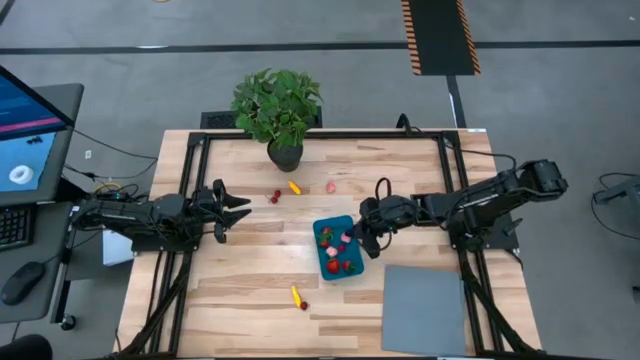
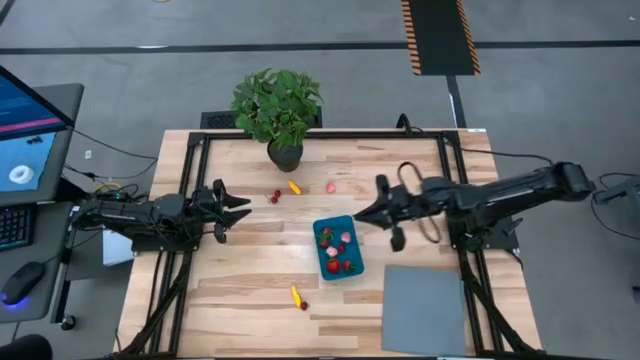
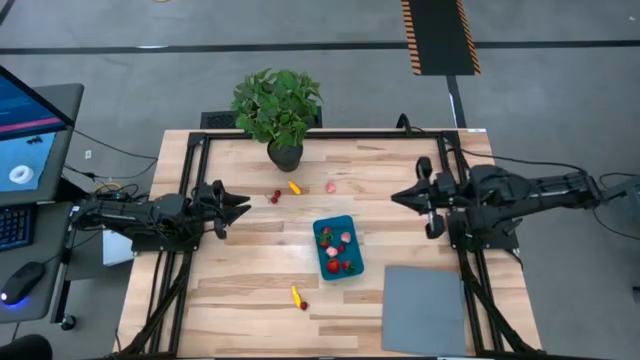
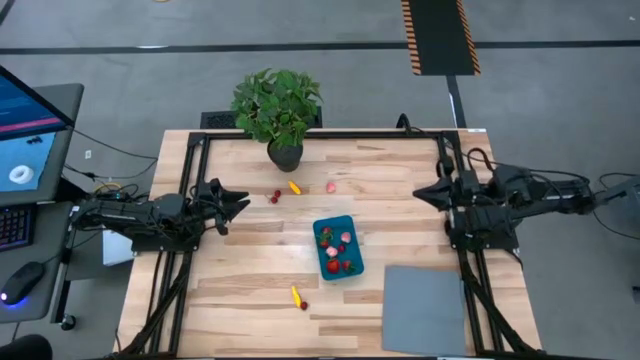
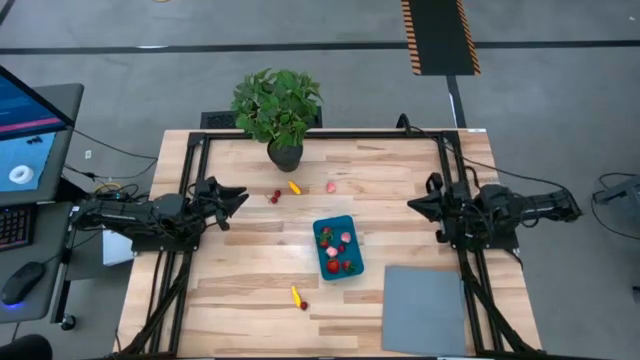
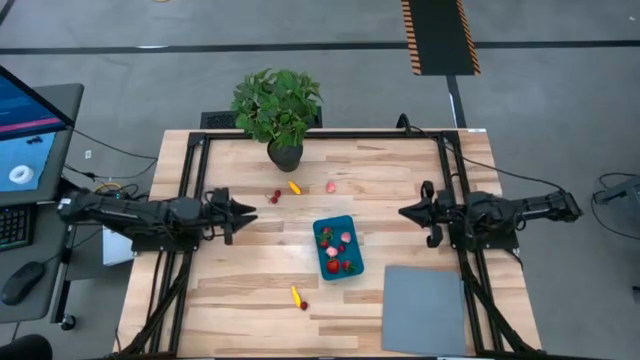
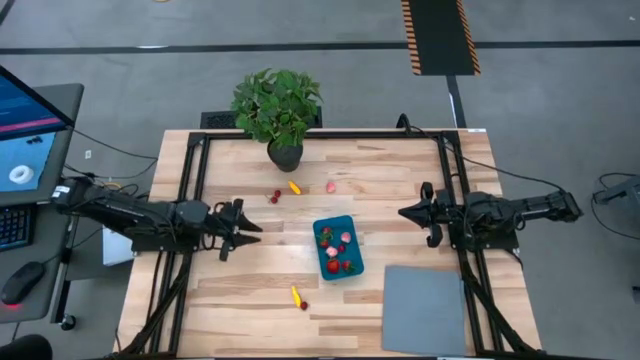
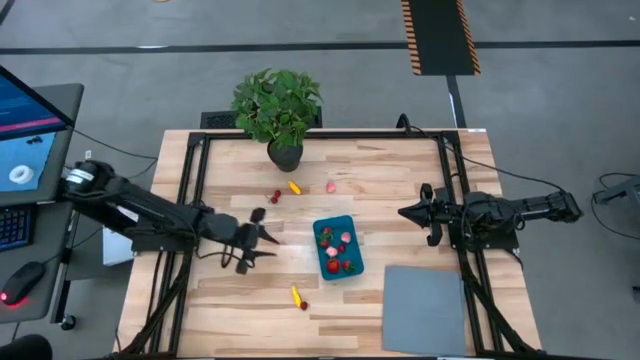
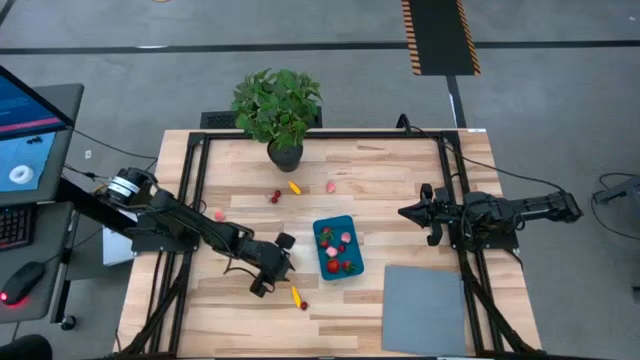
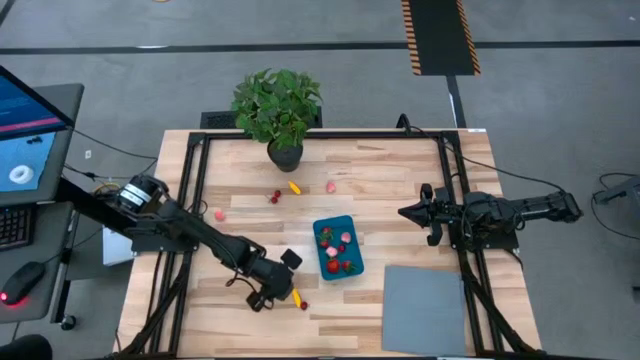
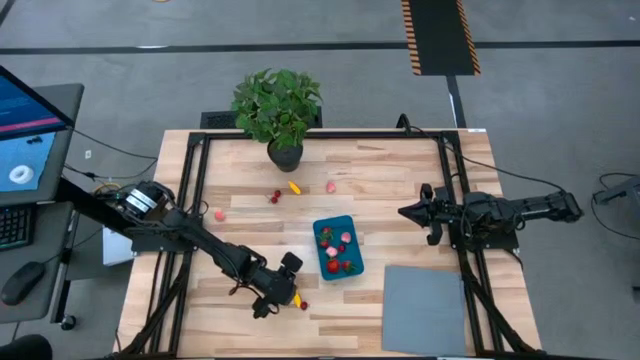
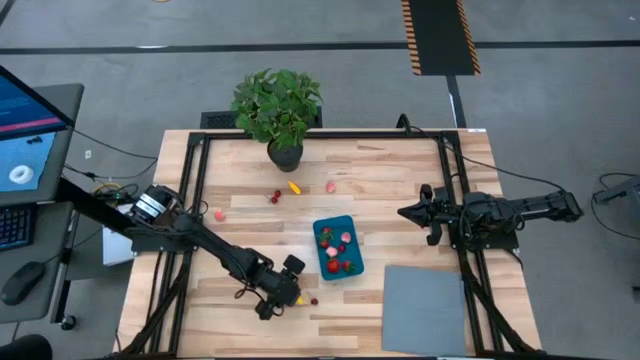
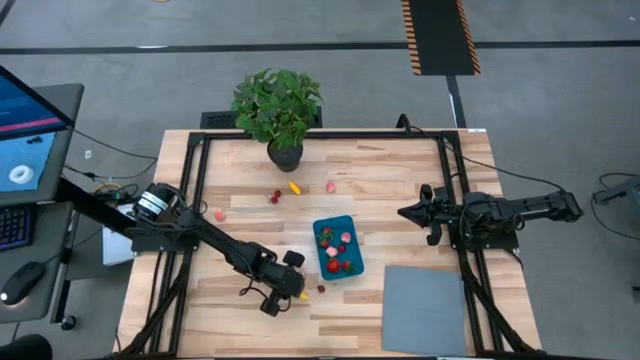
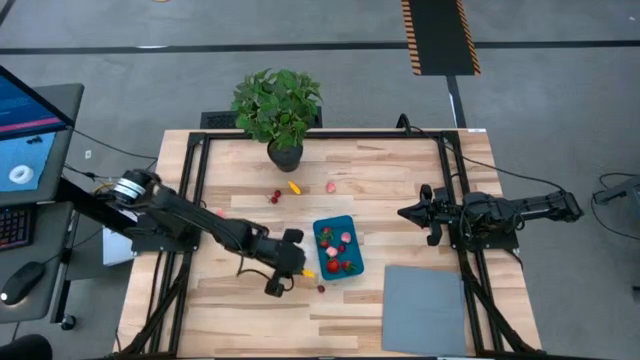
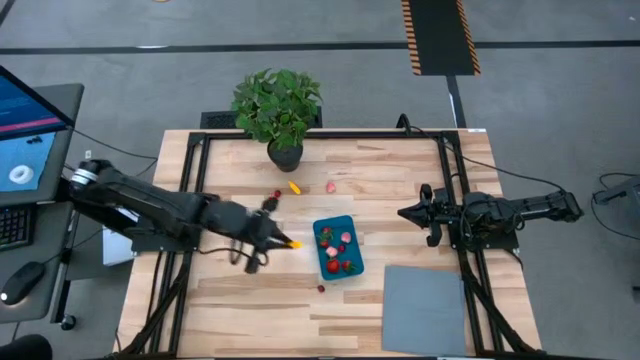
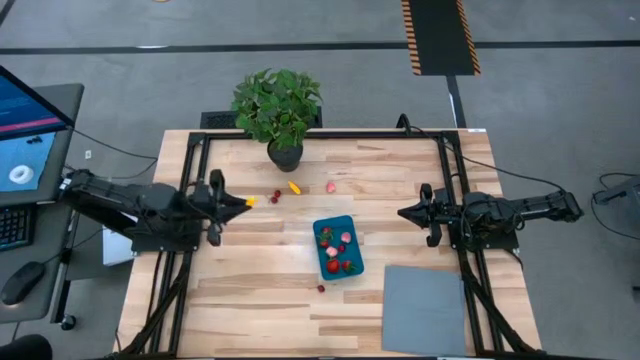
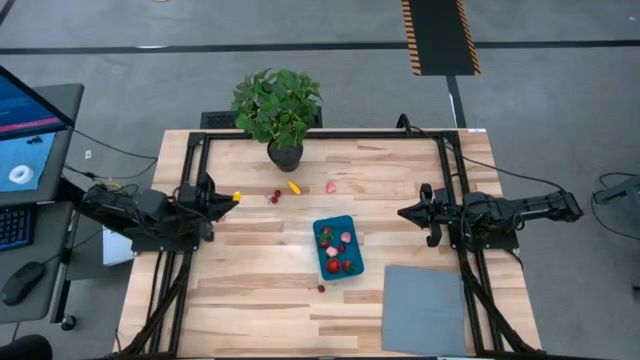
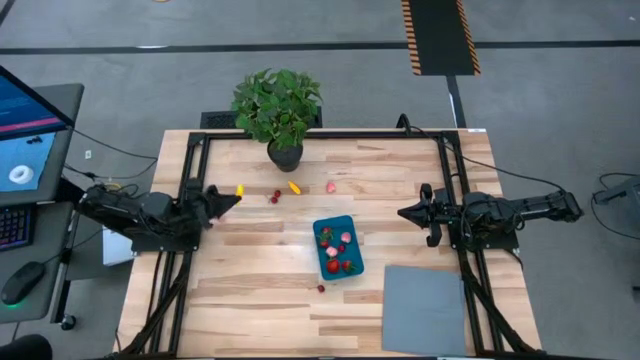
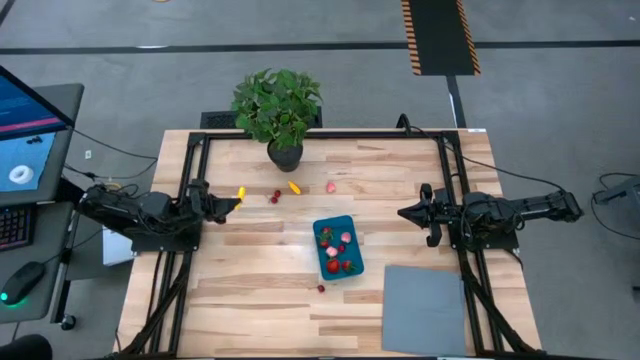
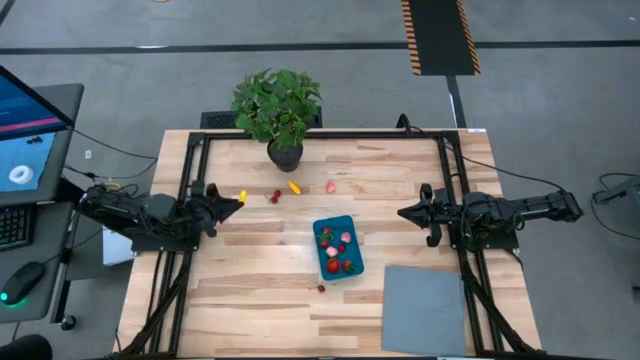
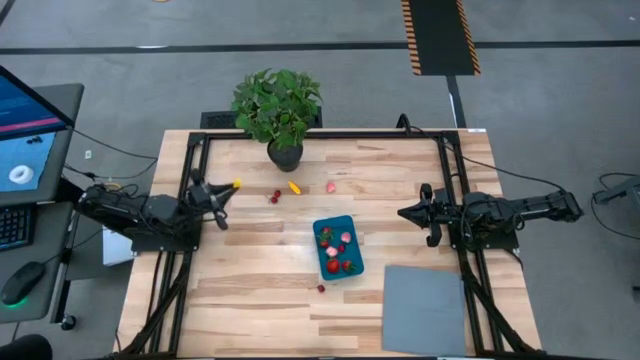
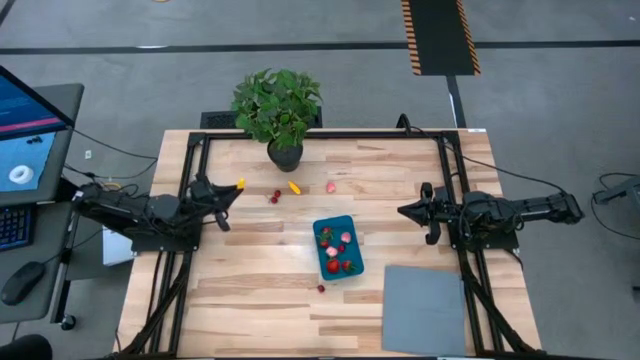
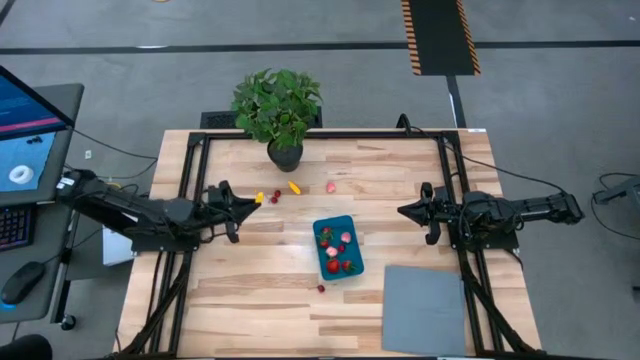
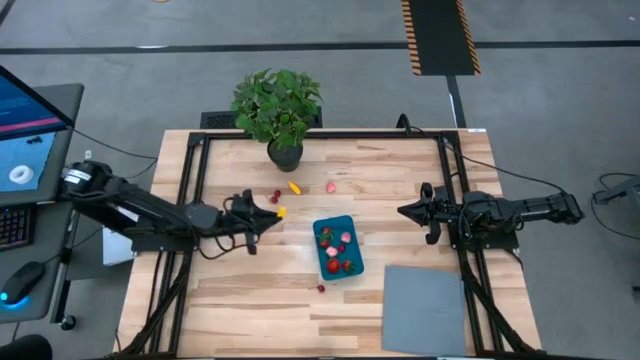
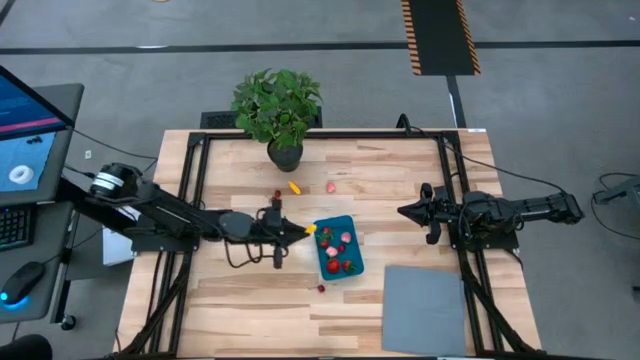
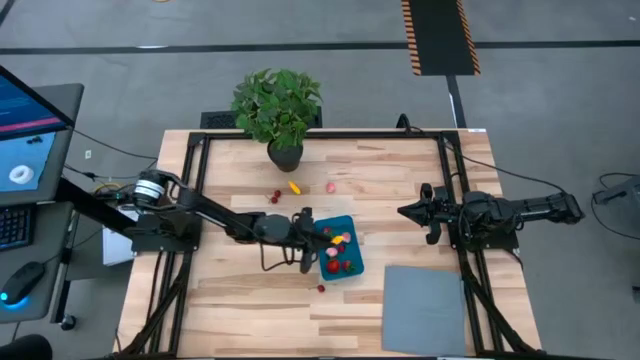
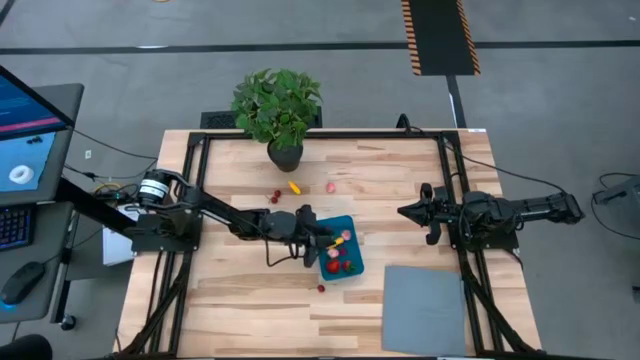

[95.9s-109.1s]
Task: Pick and placing Produce into tupperware
Put the bottom corn into the blue bin

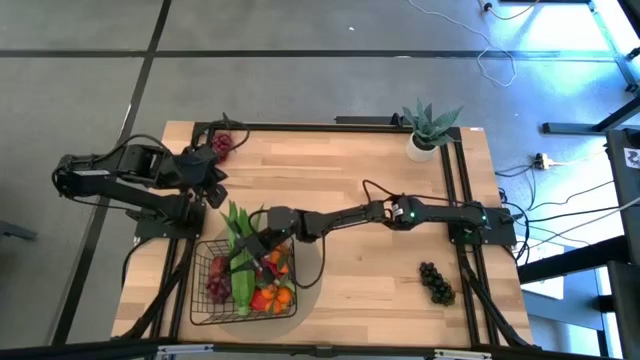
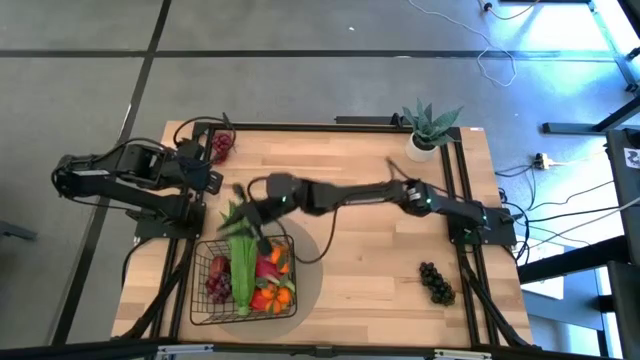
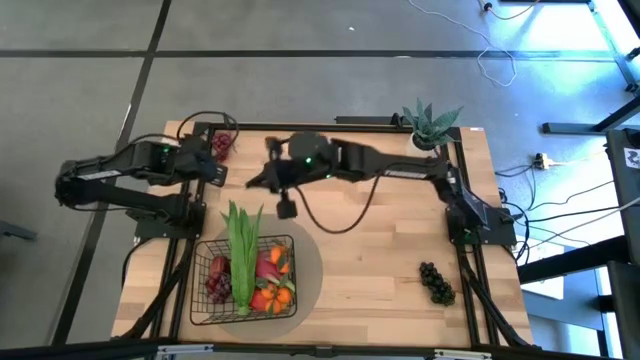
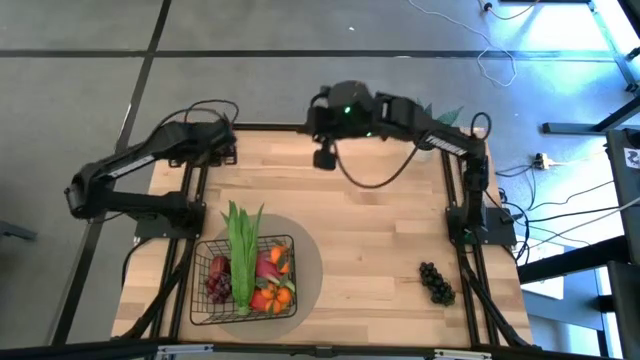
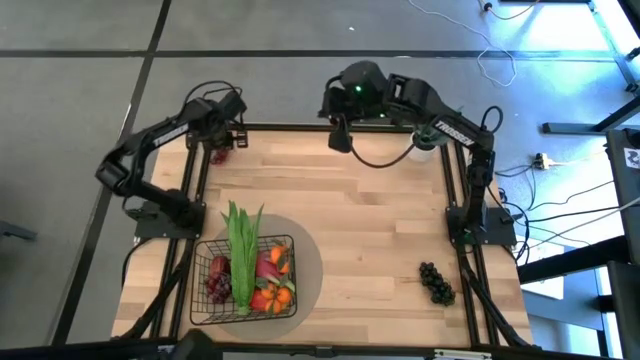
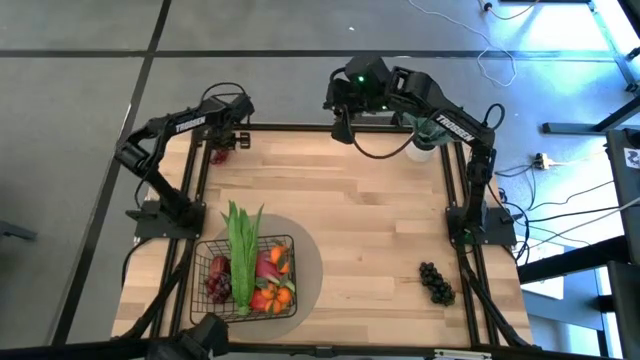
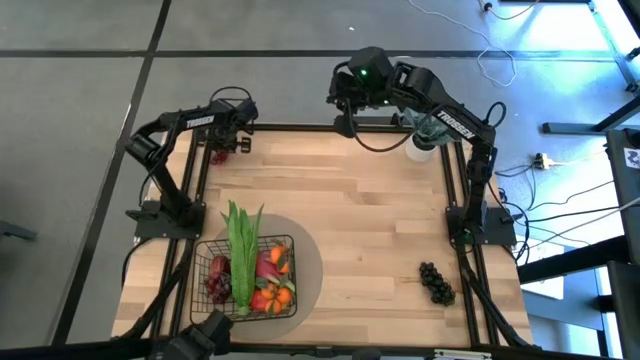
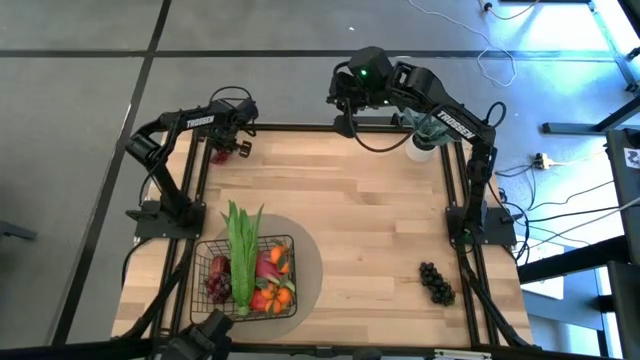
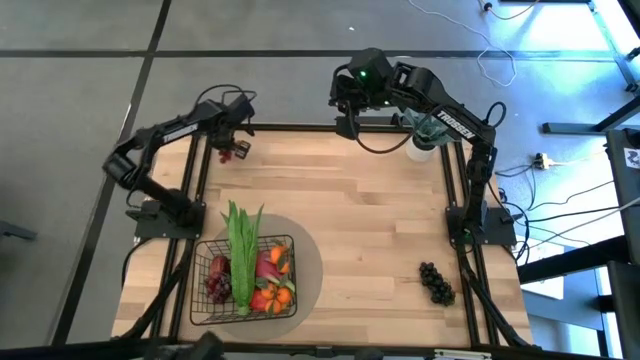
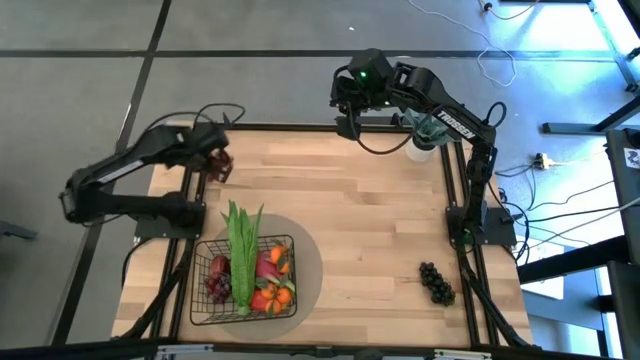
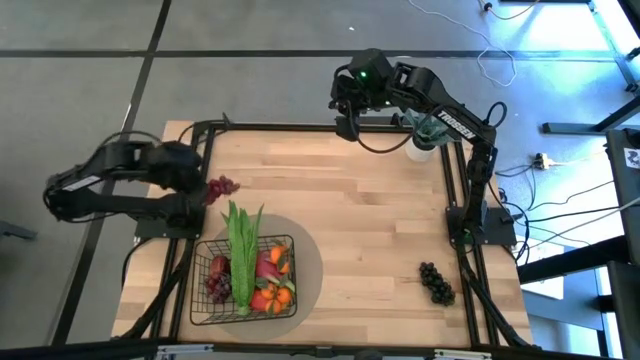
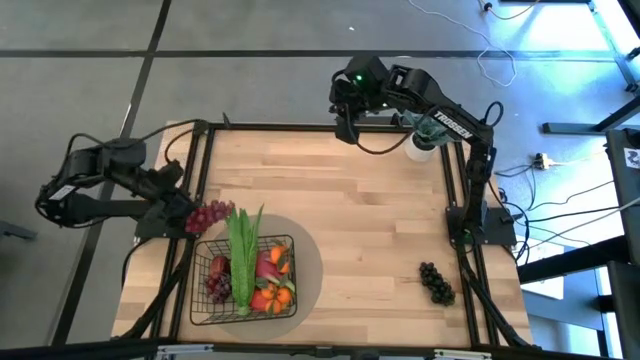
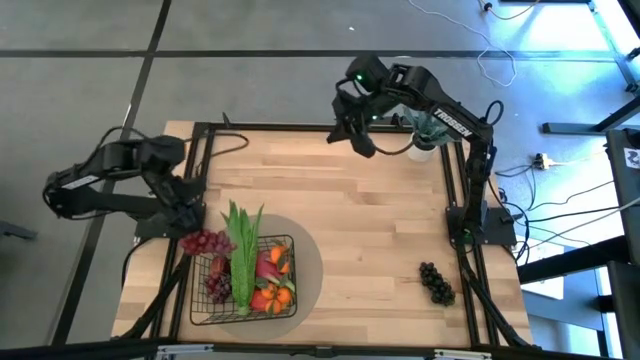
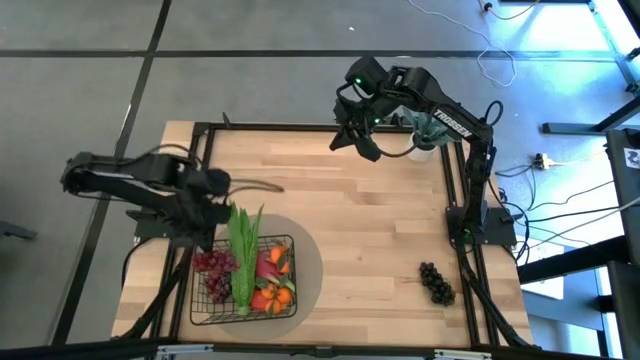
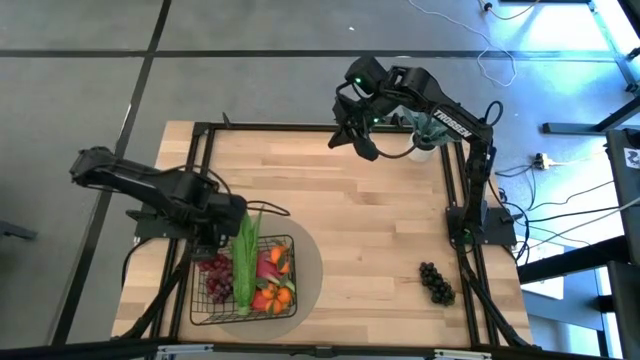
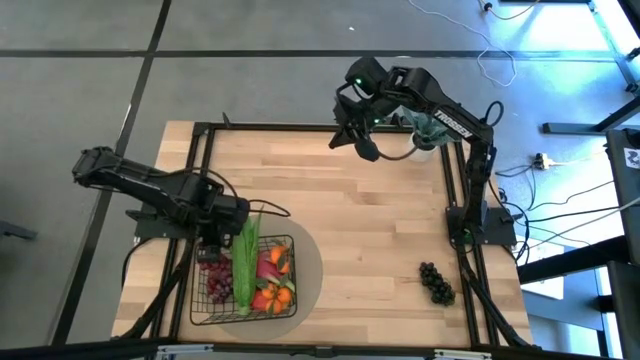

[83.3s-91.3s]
Task: Build produce basket
Put the violet grapes into the black wire basket
